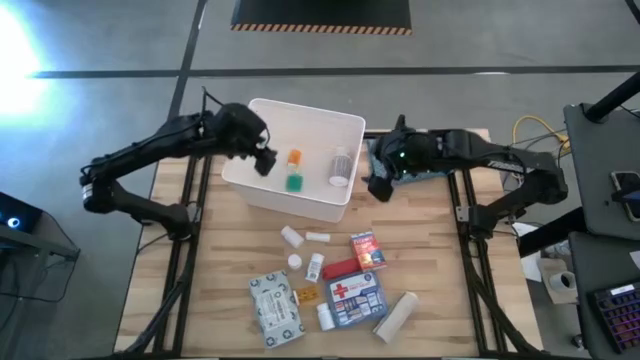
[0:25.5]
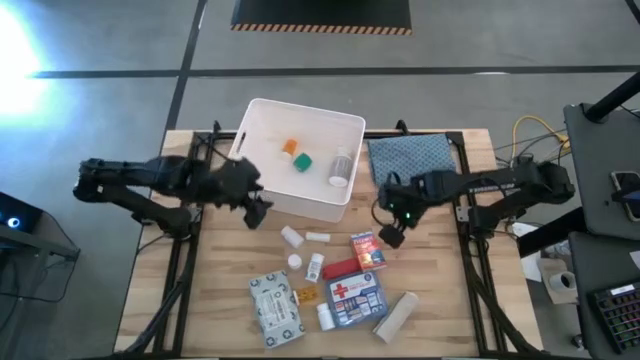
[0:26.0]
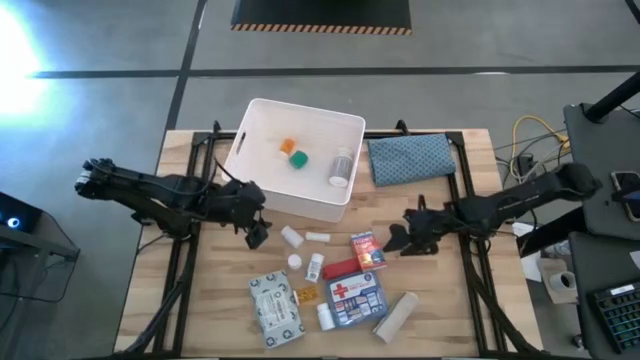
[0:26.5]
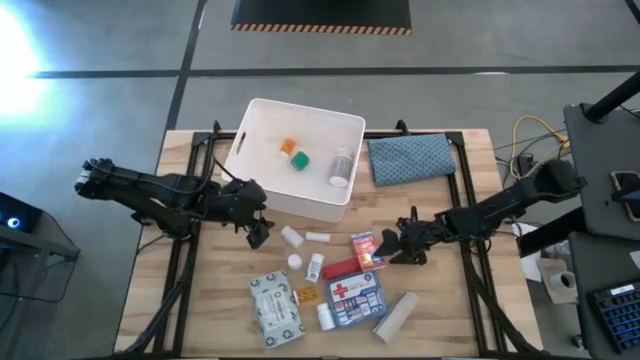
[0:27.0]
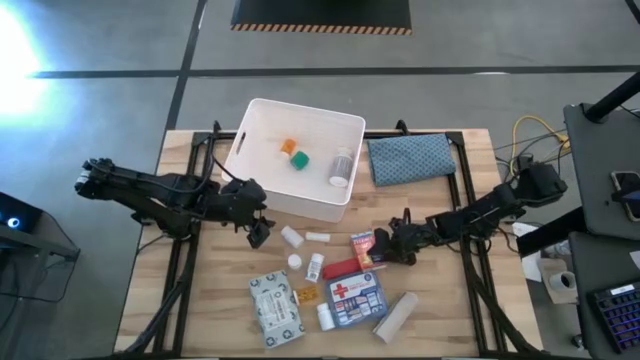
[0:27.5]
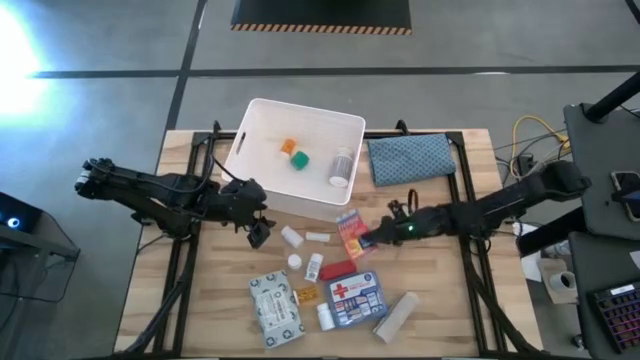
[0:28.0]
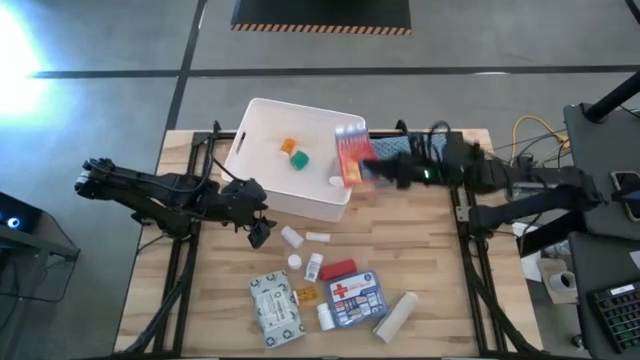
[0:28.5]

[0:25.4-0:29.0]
Task: Pick & place medical supplies in basket/bin
Put the red medicine box into the white bin

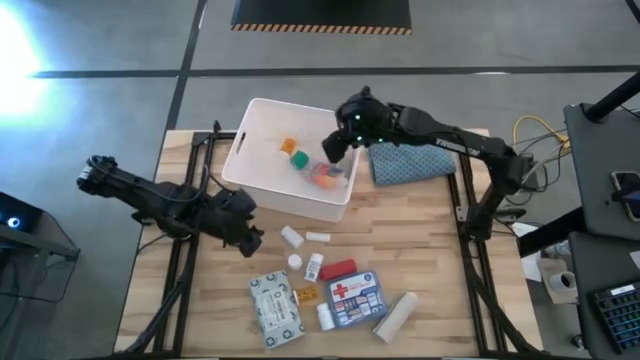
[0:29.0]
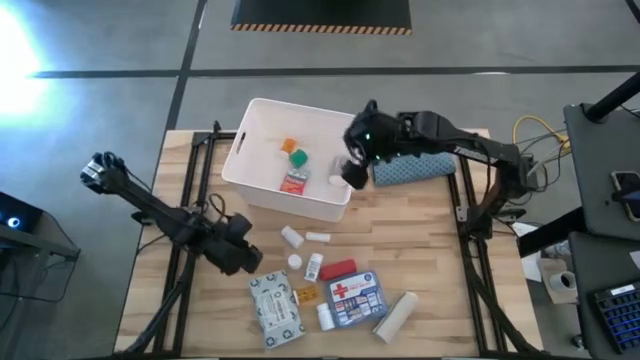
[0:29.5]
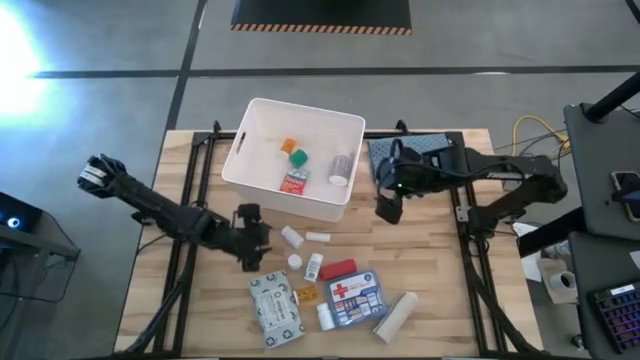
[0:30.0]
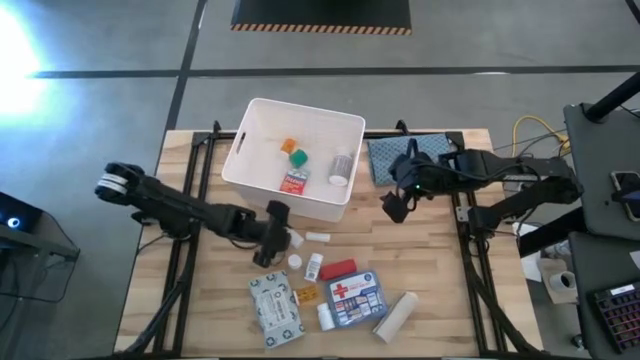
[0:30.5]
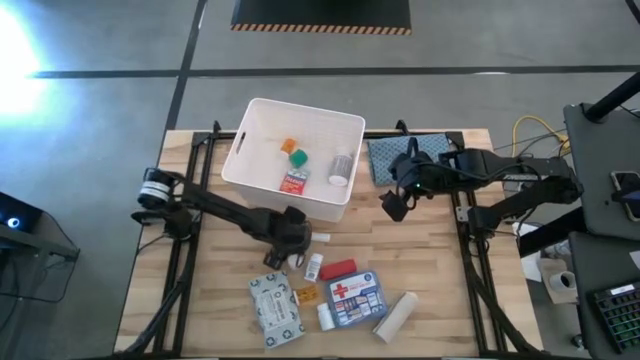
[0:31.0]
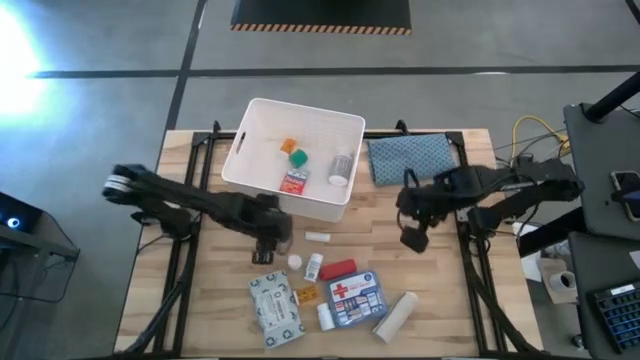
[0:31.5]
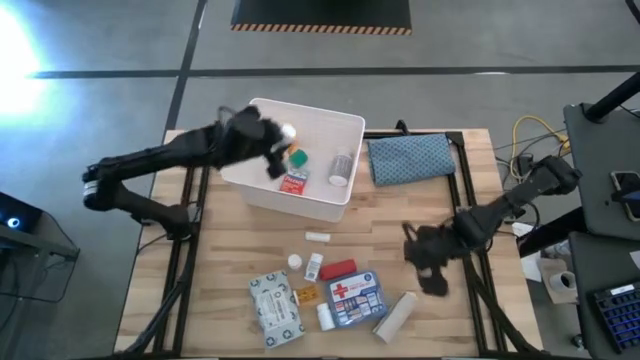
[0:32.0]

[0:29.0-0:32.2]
Put the top small white pill bottle into the white bin

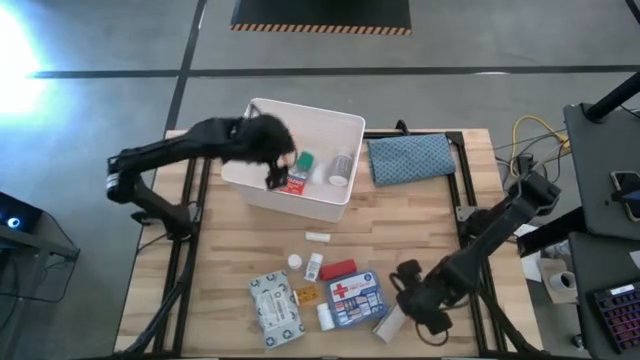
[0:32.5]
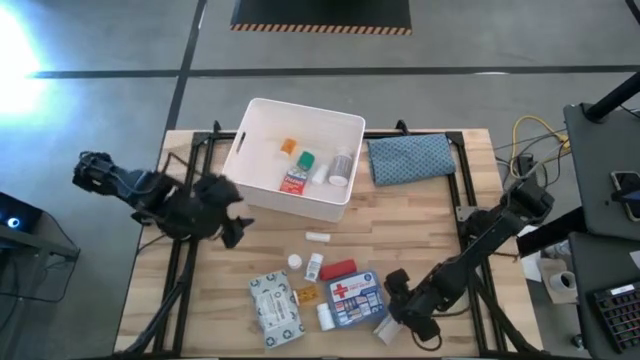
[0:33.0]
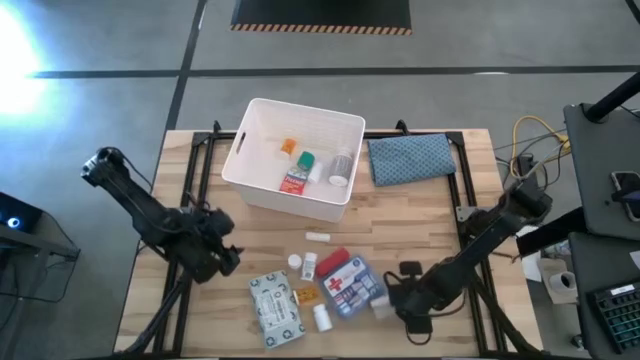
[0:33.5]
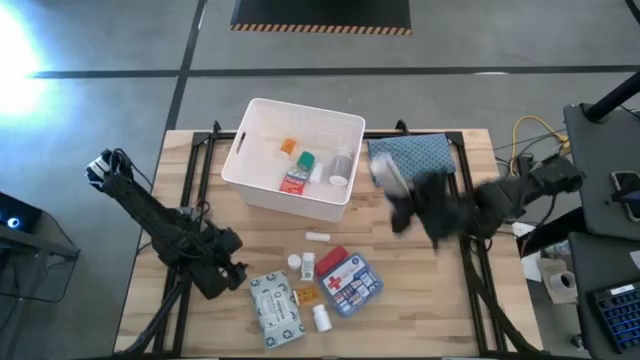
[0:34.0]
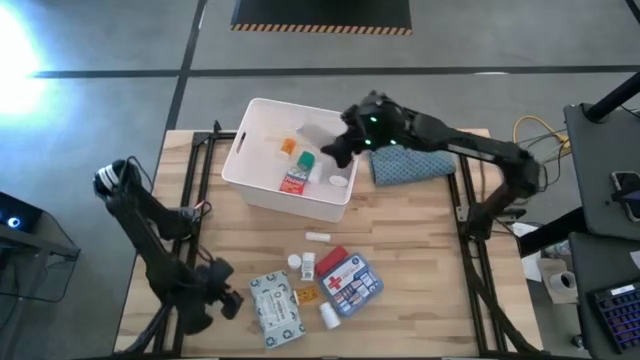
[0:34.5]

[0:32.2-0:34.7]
Put the white bandage roll into the white bin

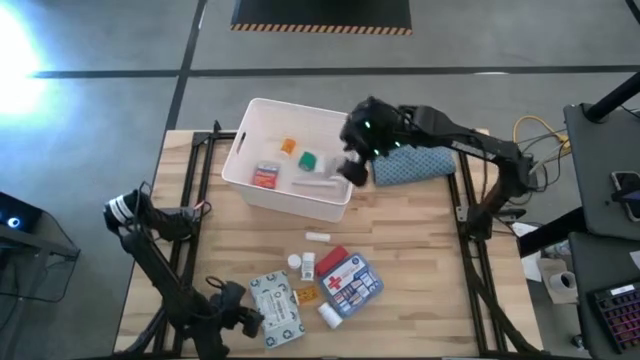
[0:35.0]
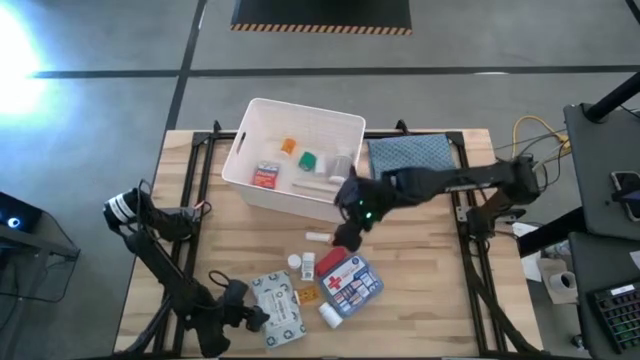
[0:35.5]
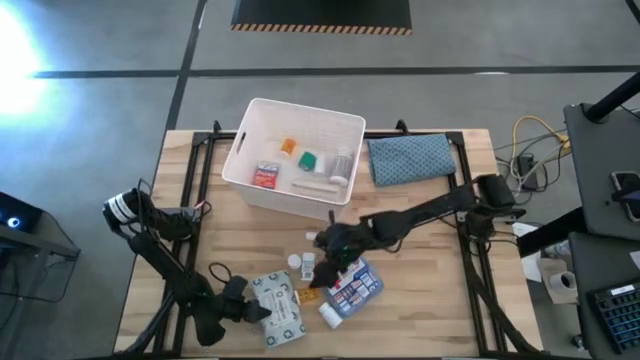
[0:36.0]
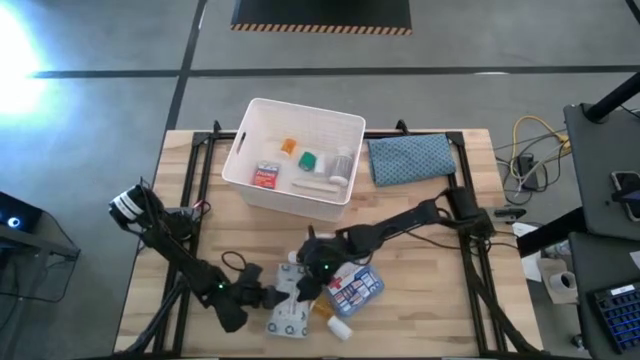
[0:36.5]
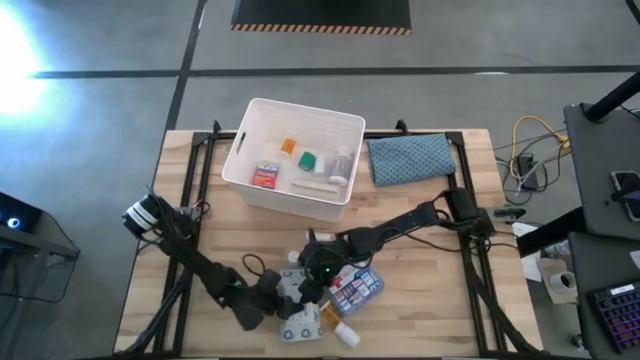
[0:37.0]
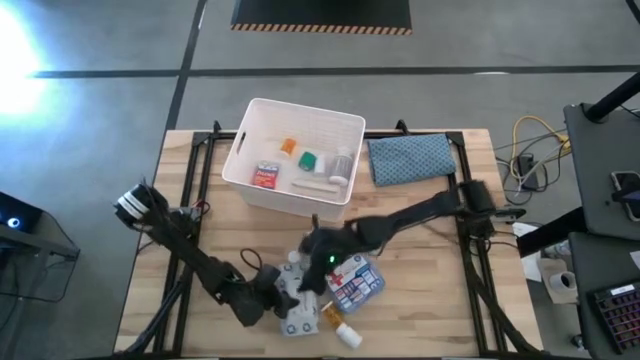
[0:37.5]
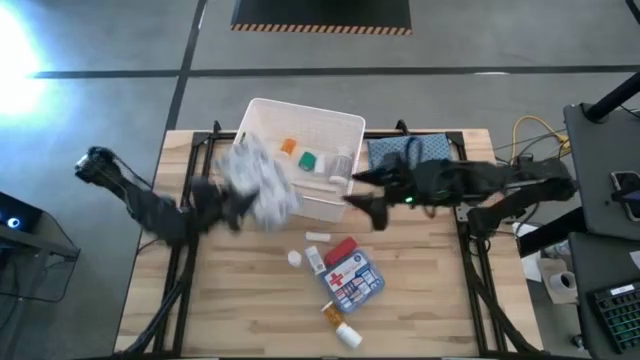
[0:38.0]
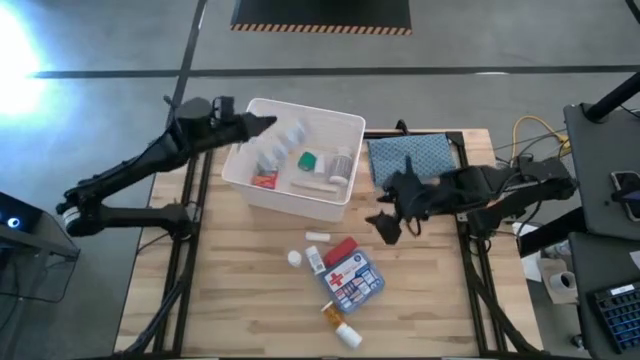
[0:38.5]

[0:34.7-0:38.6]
Put the white mailer bag into the white bin

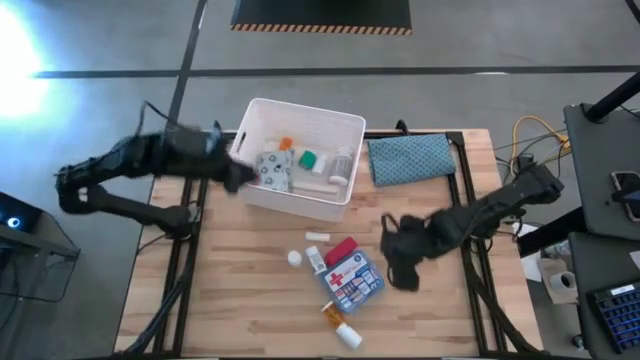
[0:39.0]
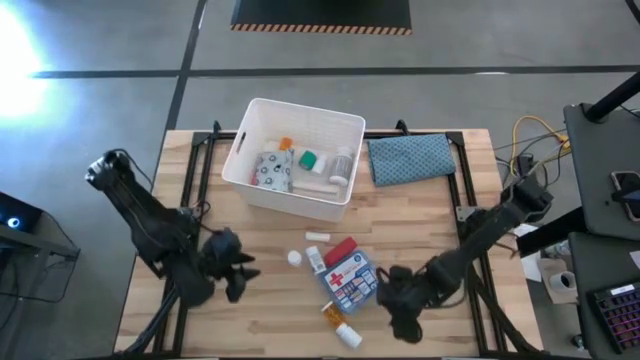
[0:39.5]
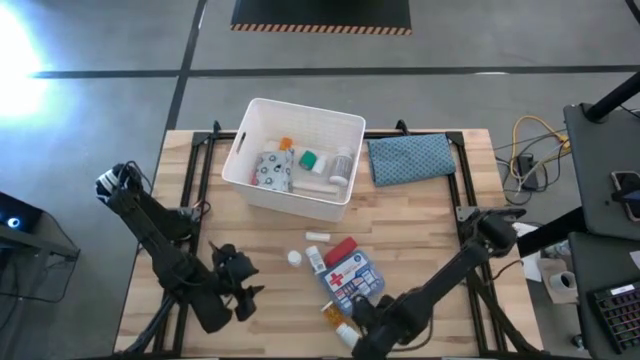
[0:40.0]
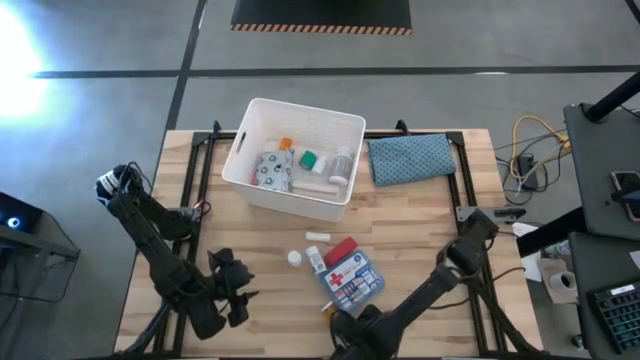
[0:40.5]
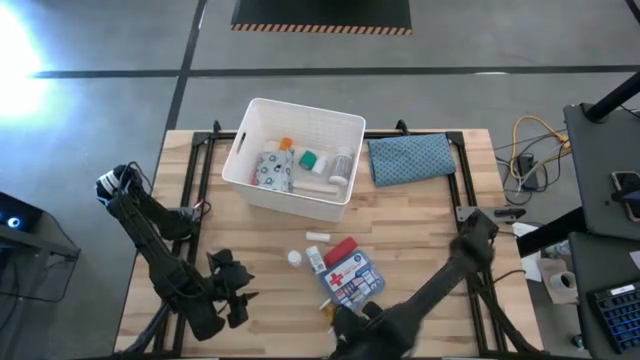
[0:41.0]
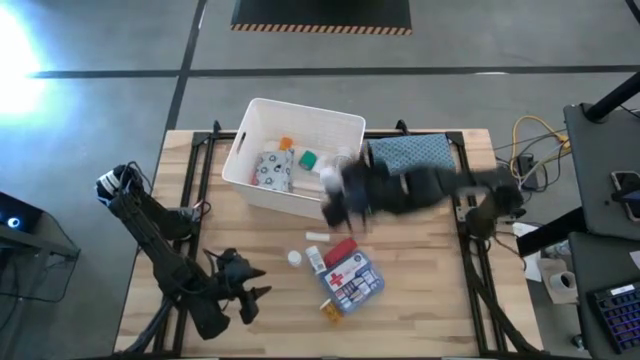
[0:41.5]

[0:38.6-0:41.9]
Put the bottom small white pill bottle into the white bin

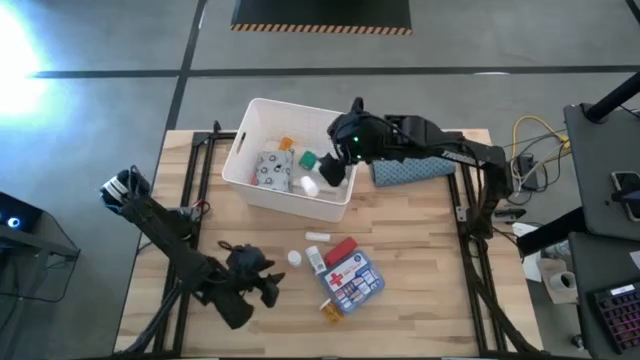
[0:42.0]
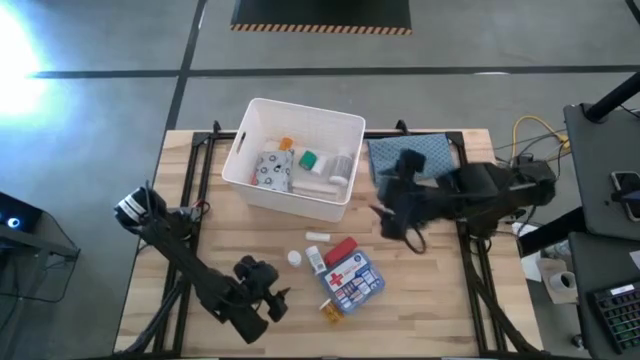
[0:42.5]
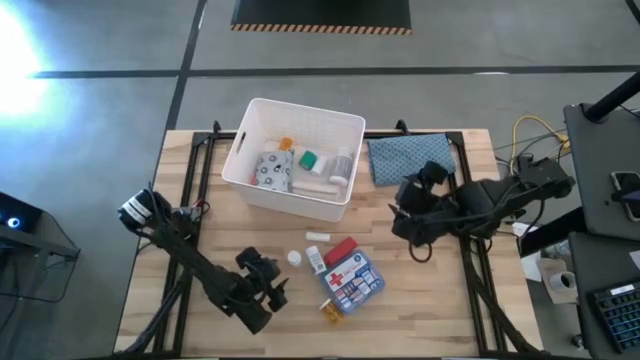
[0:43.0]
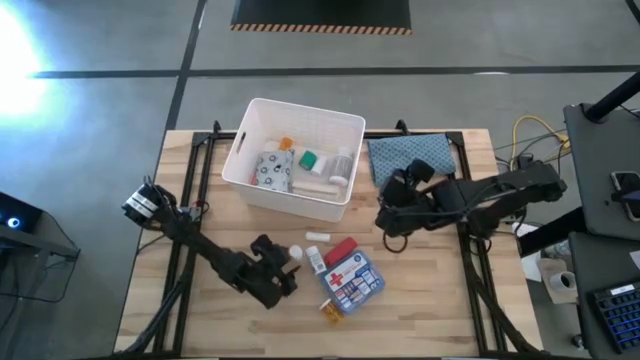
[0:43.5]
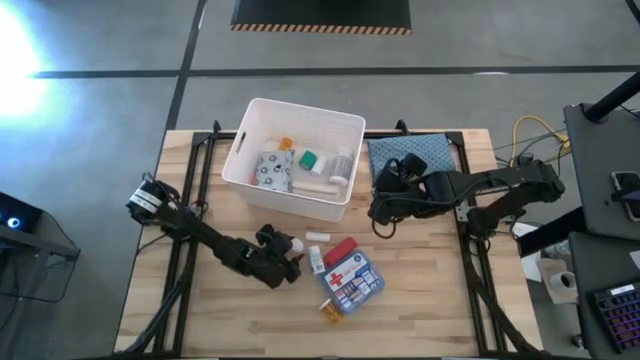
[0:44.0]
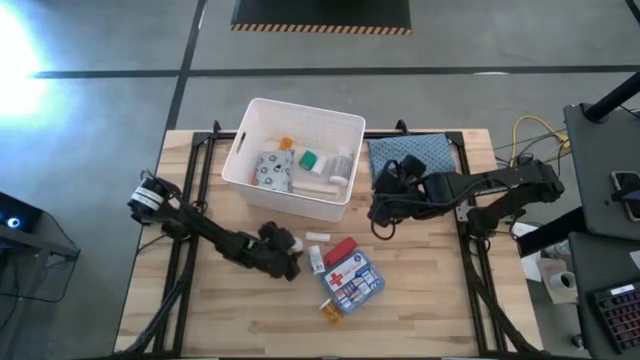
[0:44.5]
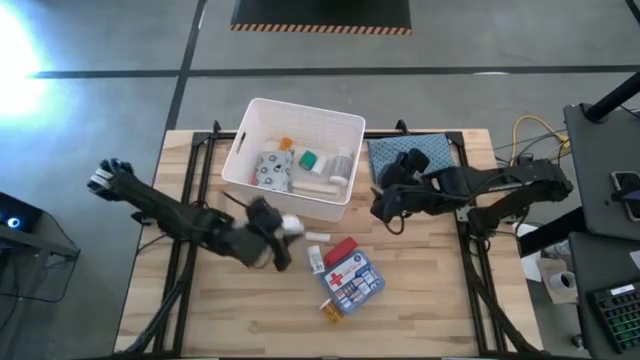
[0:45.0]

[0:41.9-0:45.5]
Put the small white pill bottle into the white bin

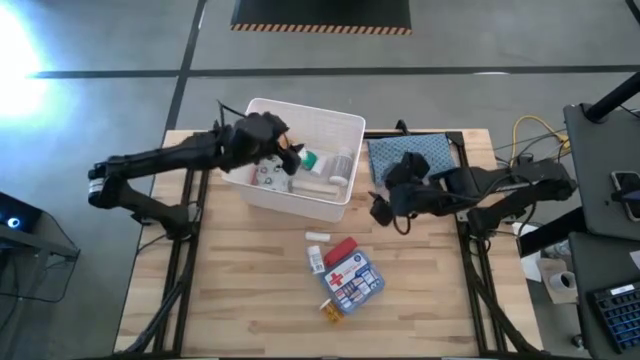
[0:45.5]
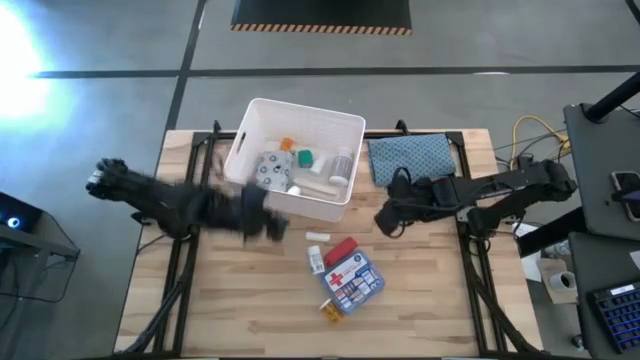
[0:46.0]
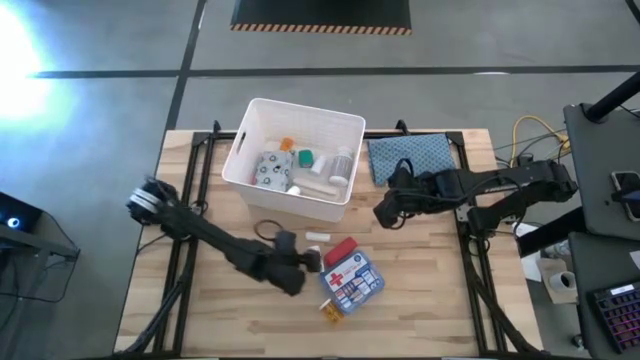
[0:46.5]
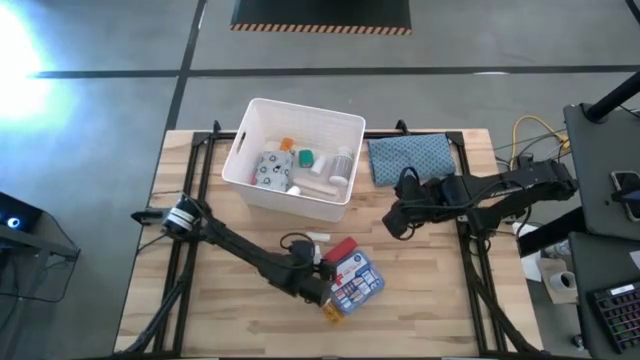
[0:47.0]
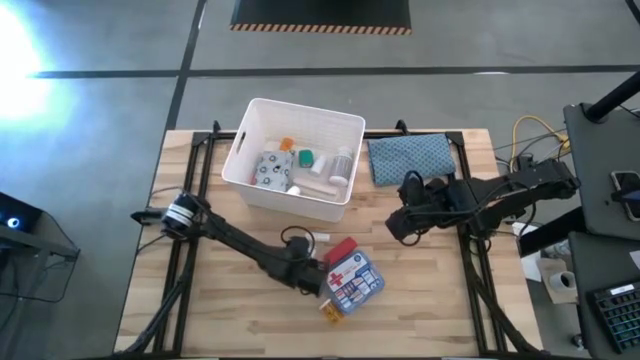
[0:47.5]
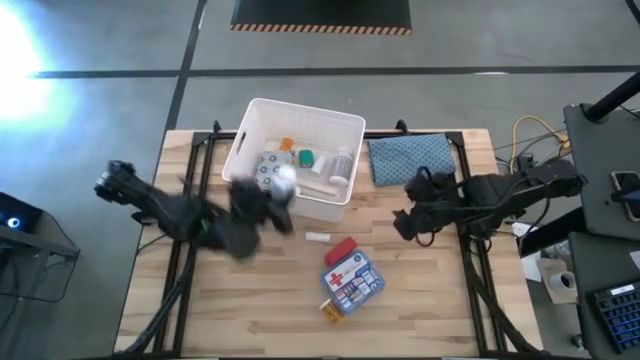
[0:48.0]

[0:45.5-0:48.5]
Put the small blue pill bottle into the white bin
